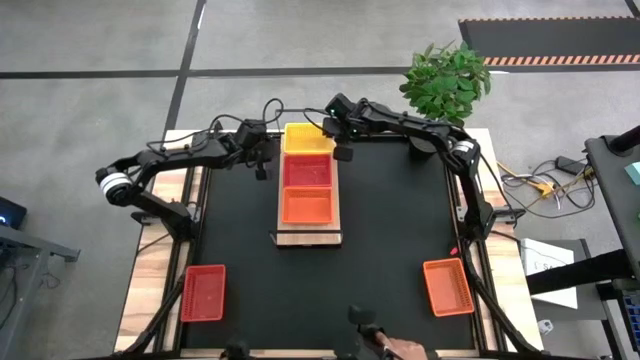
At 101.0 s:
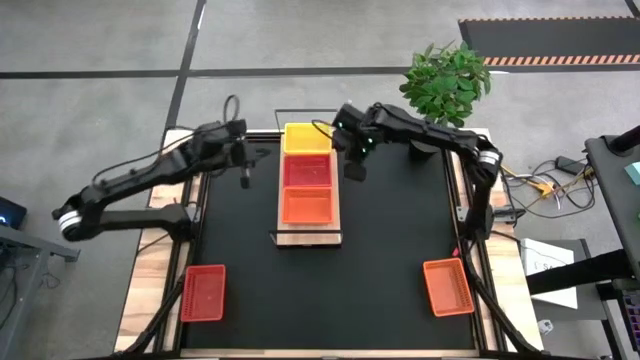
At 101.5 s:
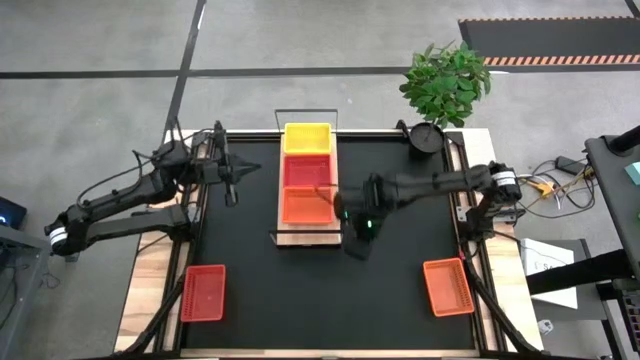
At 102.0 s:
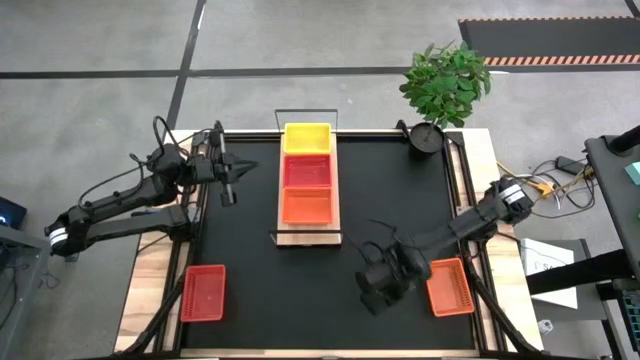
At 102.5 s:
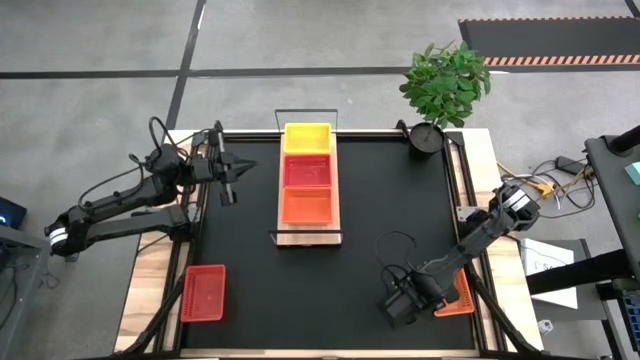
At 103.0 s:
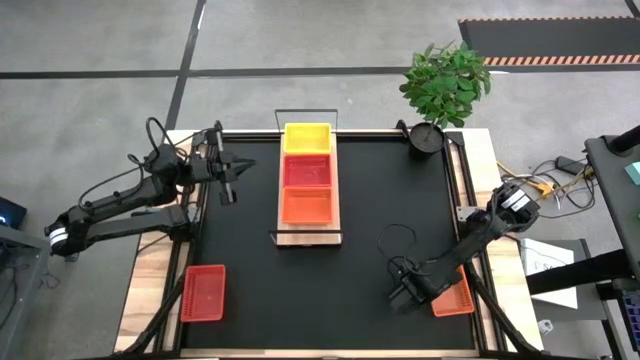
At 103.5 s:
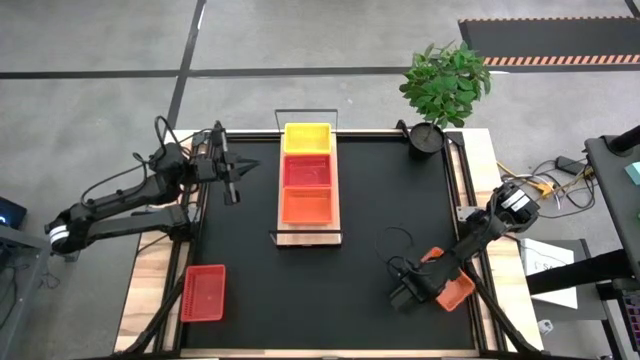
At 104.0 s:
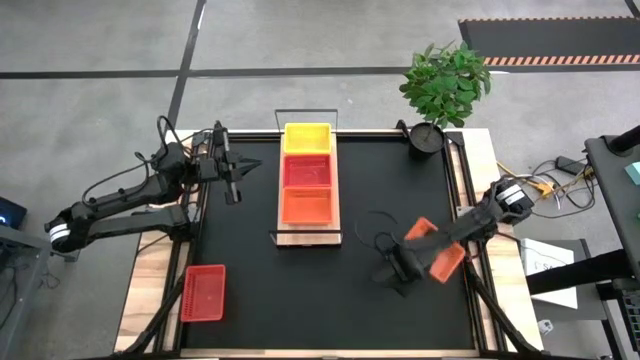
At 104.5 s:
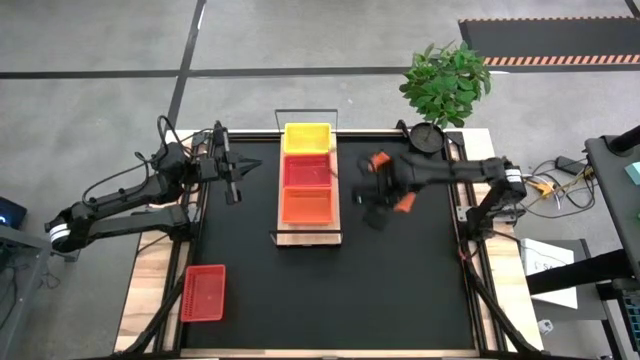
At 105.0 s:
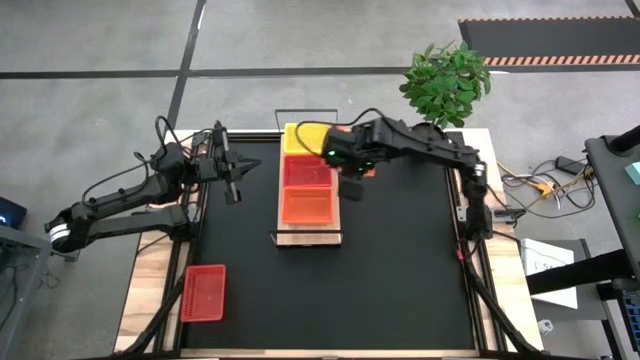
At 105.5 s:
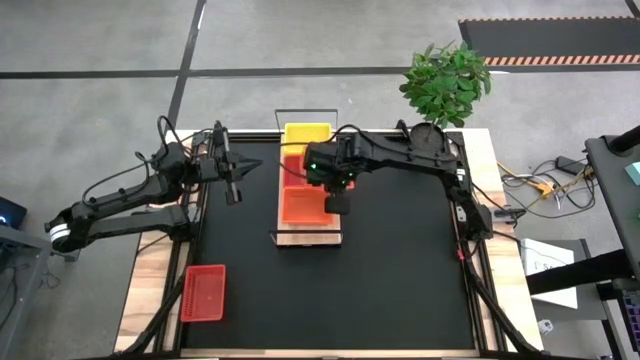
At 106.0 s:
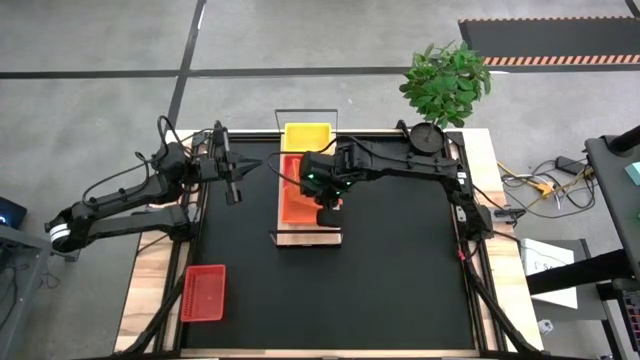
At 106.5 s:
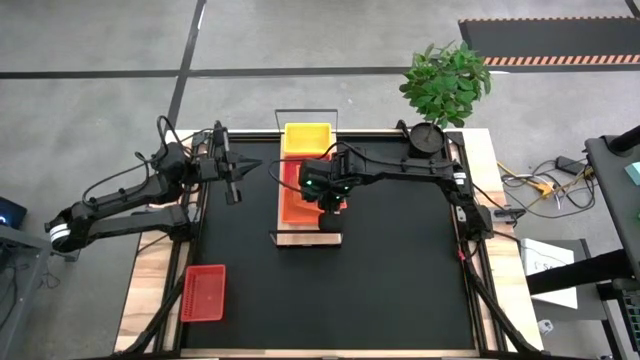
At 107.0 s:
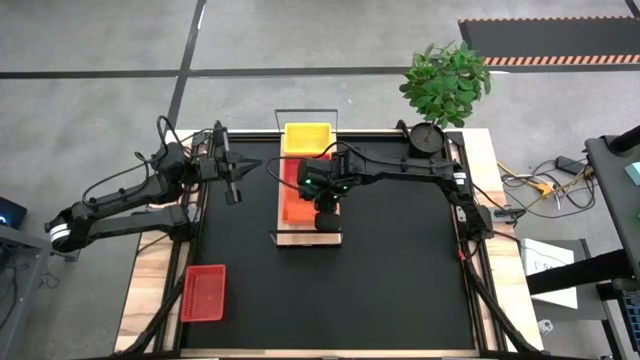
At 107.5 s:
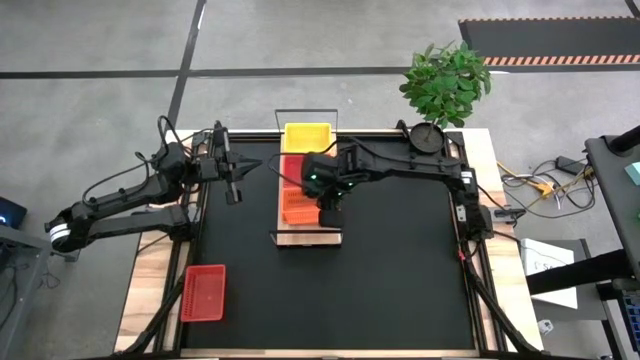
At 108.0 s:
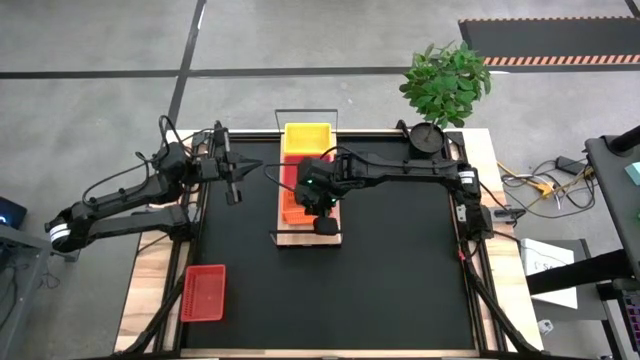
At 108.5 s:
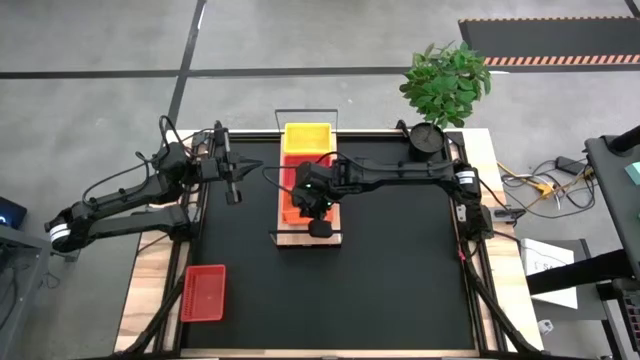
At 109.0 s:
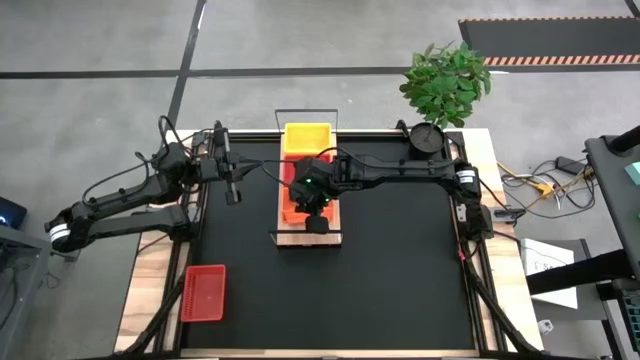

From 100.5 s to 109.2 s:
Task: Stack baskets on shelf by color
Stack the orange bin on top of the stacked orange bins on the shelf

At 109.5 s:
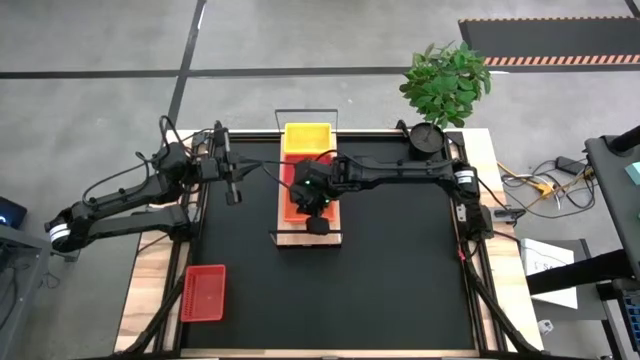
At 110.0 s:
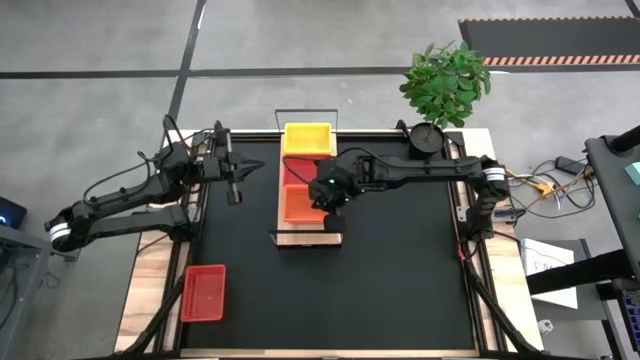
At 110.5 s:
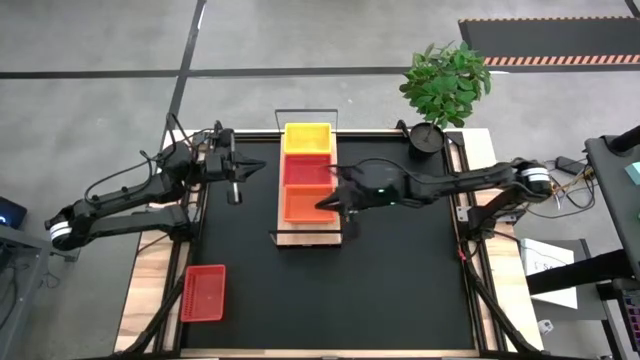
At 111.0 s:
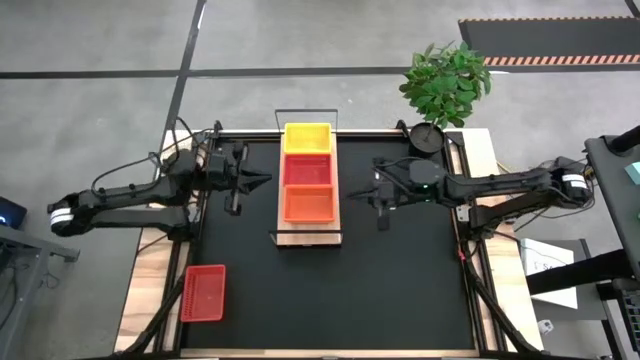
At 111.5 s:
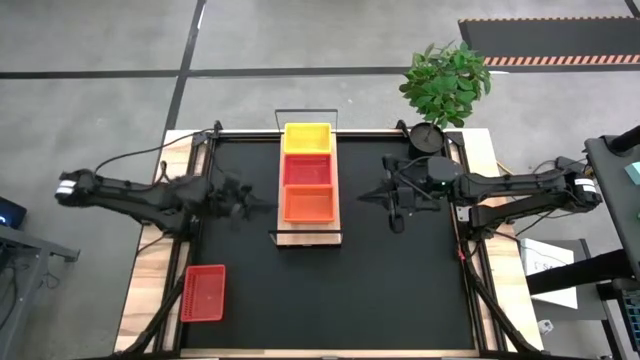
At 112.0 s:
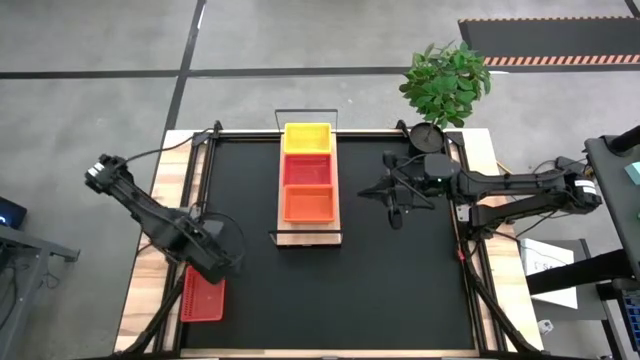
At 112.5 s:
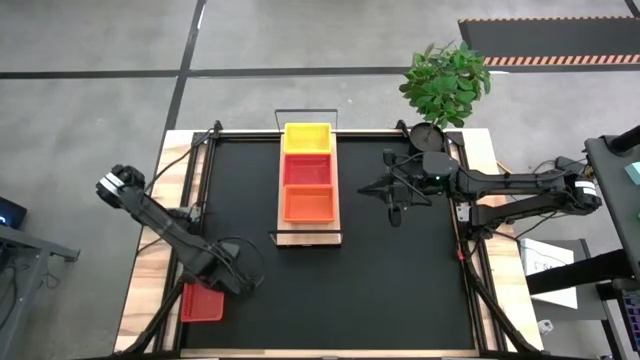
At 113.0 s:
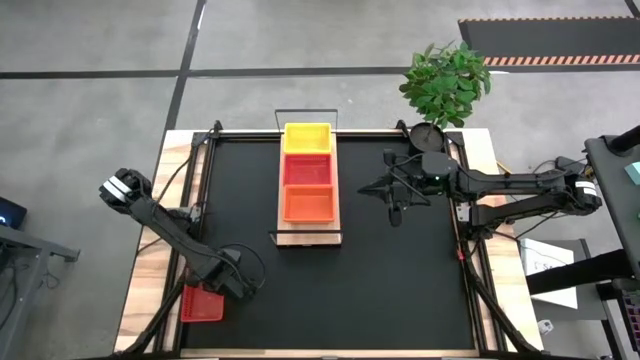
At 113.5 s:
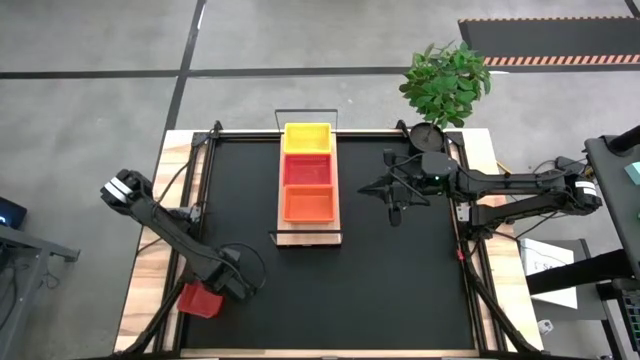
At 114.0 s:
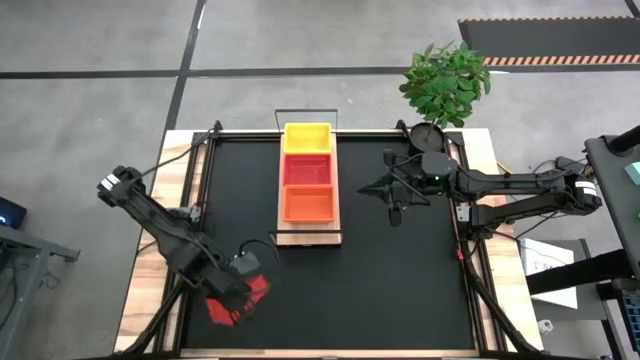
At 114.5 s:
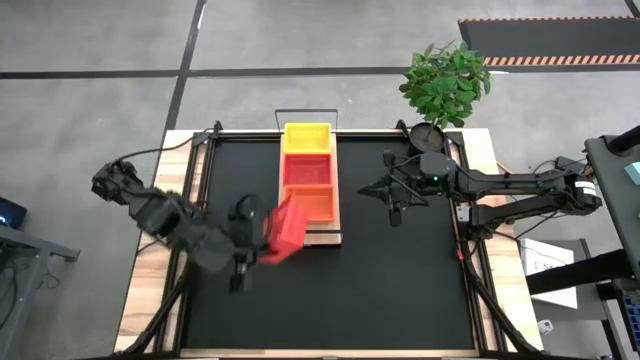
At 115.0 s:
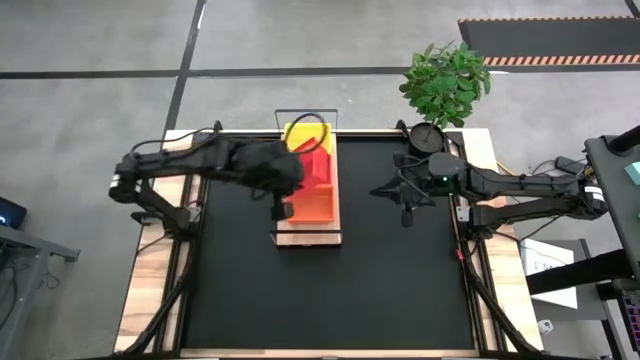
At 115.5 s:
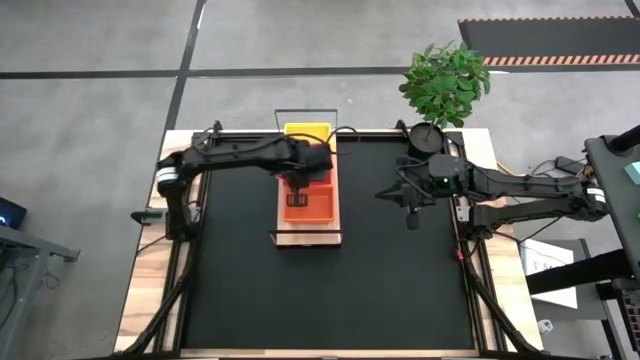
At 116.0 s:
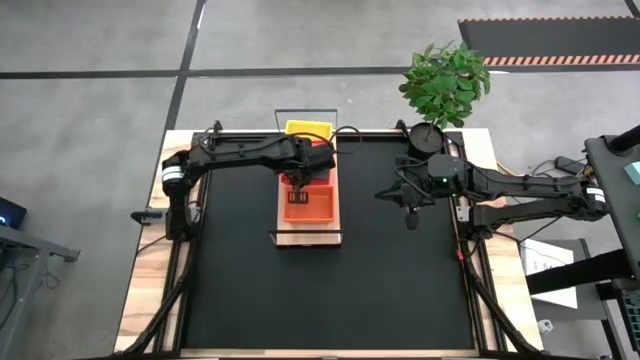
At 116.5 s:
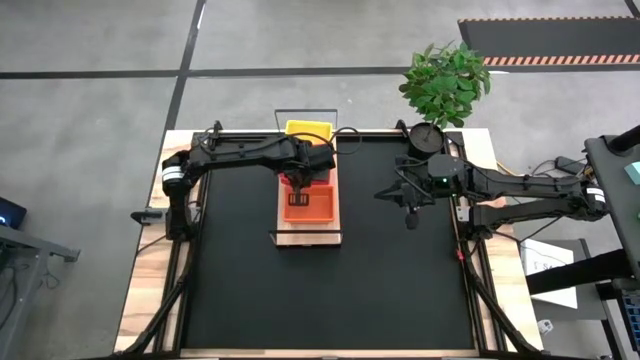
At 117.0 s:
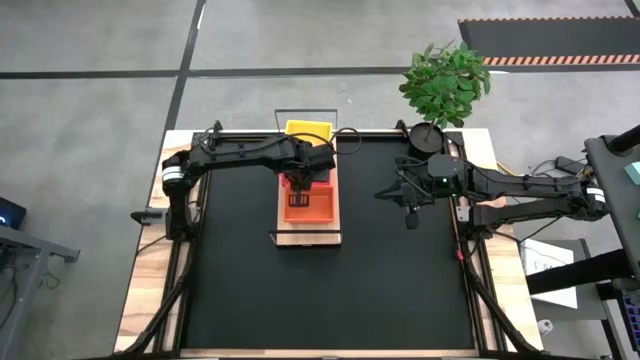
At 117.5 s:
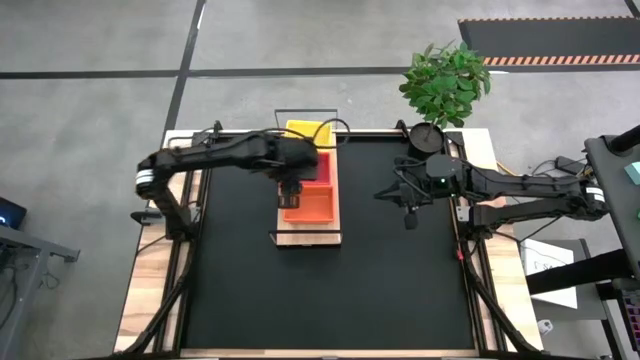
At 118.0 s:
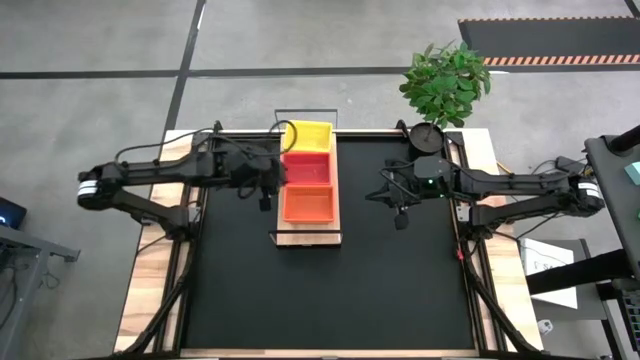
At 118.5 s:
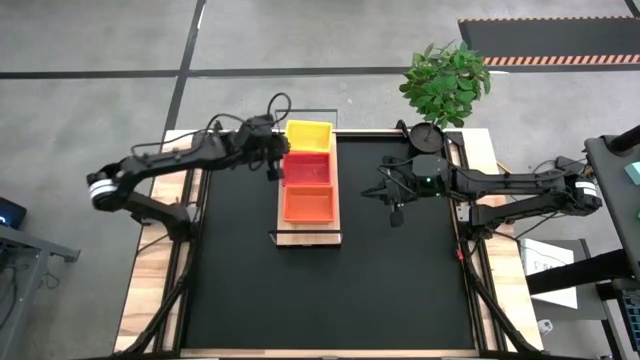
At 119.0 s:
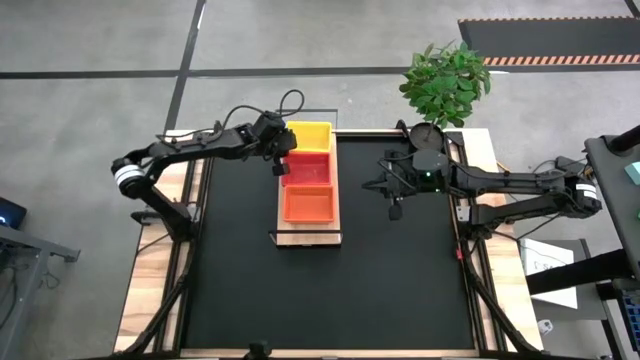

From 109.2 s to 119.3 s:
Stack the red bin on top of the stacked red bins on the shelf

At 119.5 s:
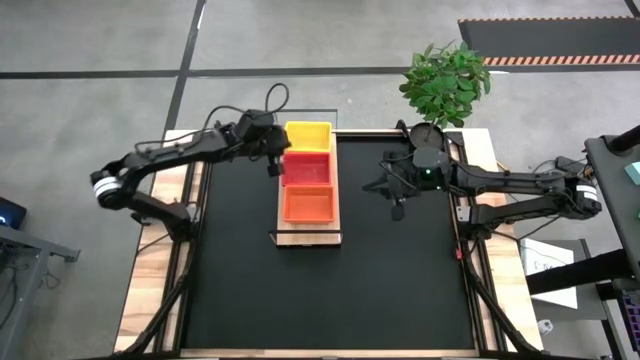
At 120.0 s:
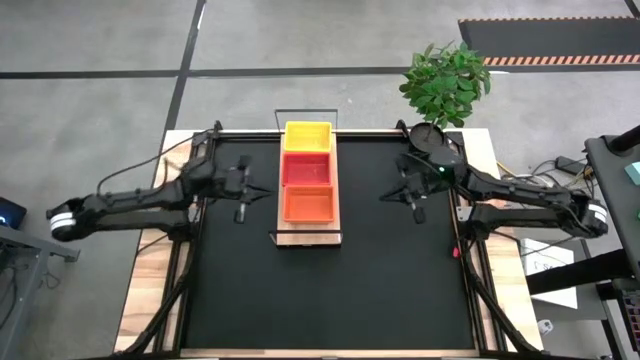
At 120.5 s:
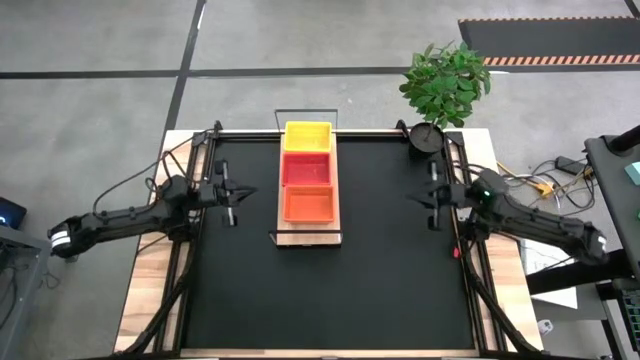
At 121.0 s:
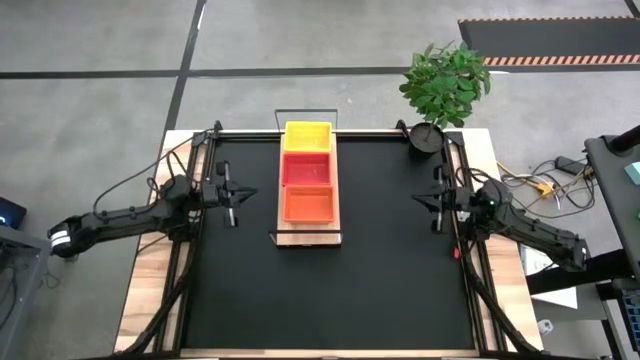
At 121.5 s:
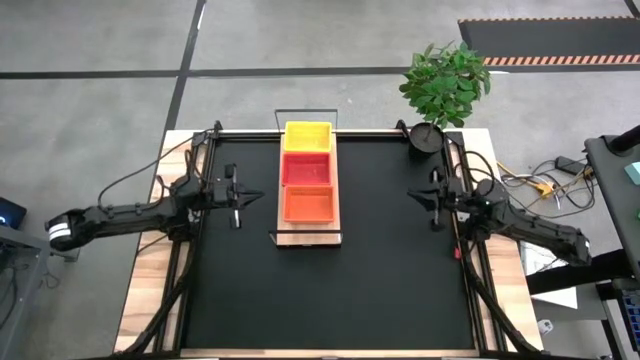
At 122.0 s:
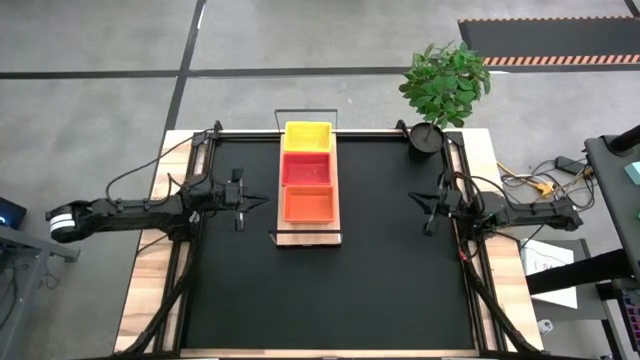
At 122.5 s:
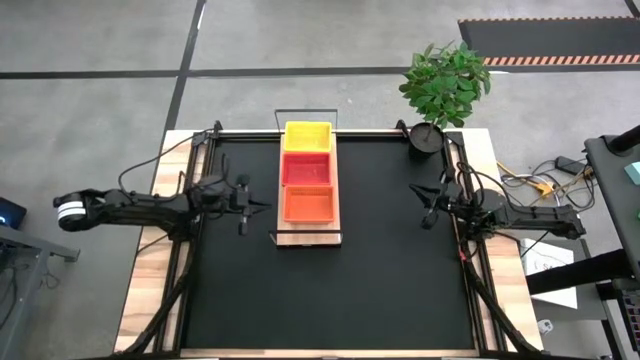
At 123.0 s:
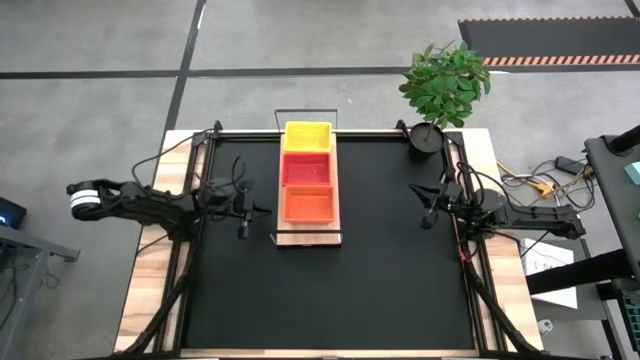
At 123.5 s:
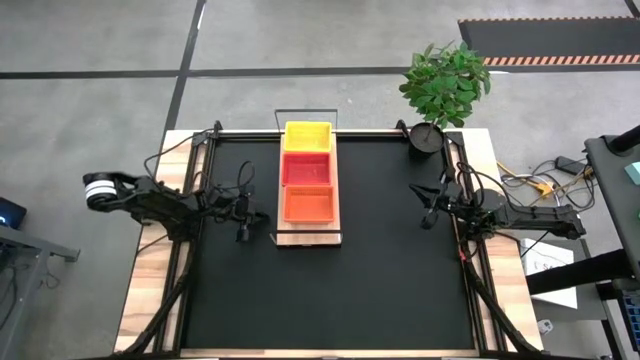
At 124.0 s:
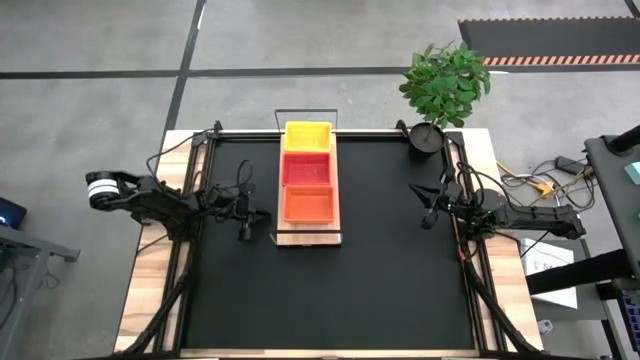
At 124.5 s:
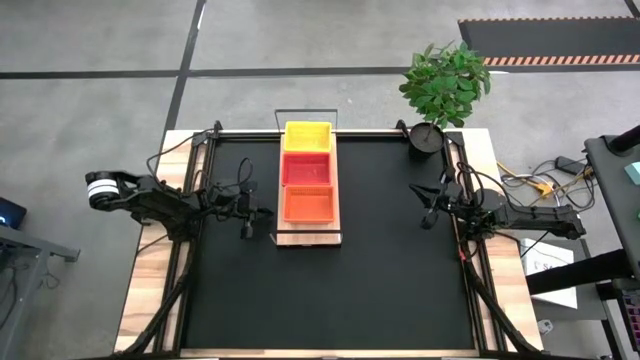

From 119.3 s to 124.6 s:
Return to Home Position
